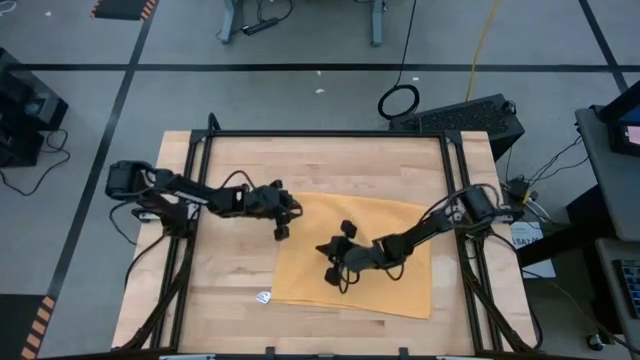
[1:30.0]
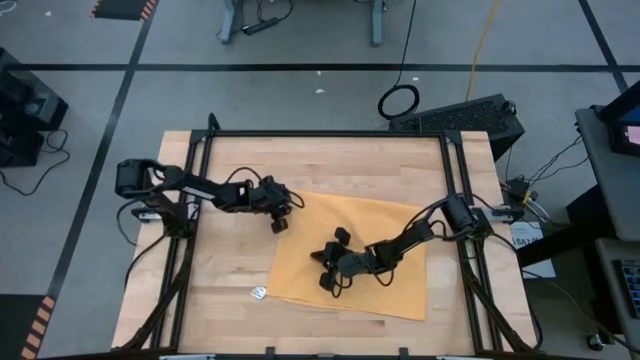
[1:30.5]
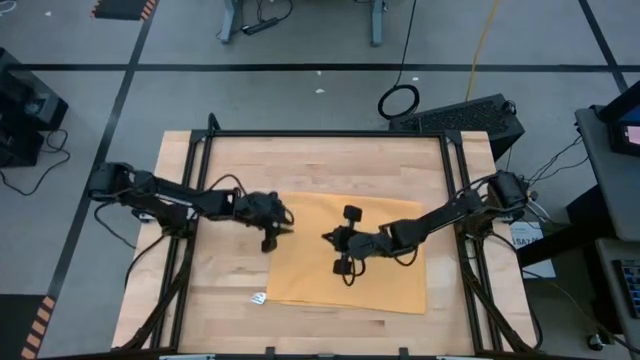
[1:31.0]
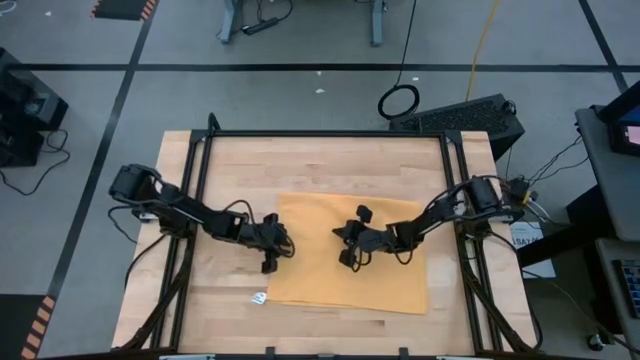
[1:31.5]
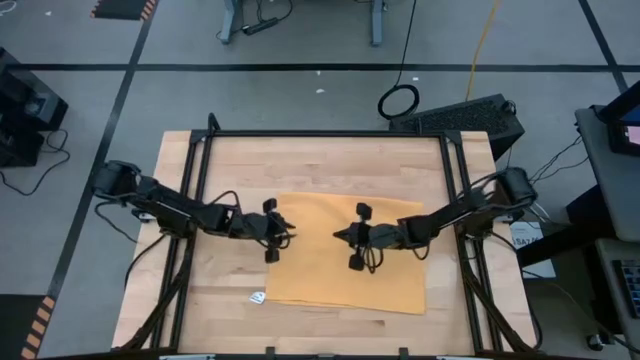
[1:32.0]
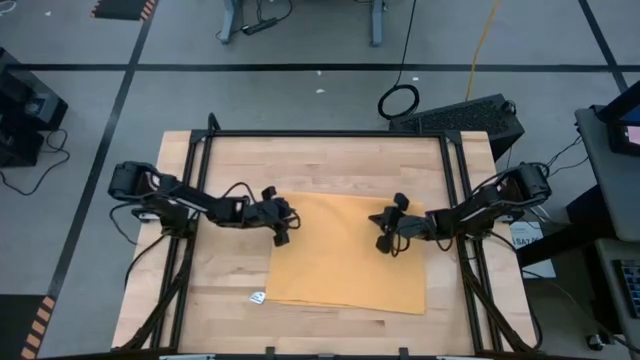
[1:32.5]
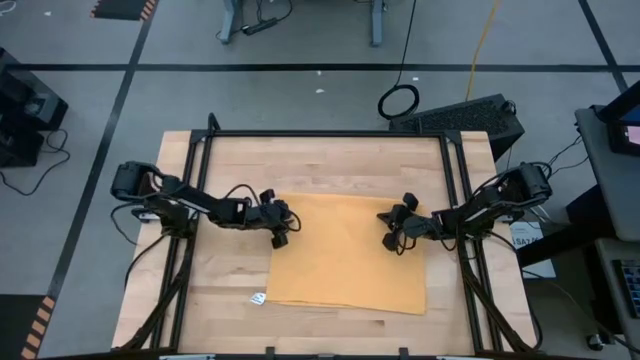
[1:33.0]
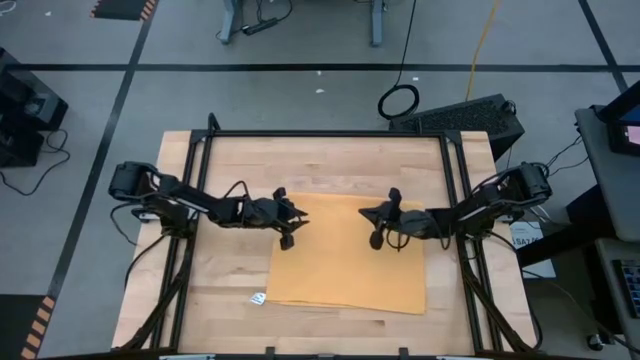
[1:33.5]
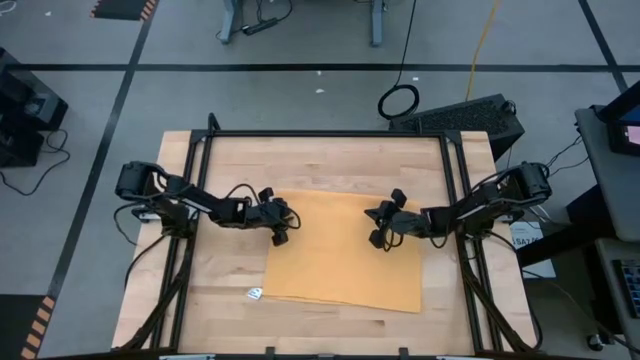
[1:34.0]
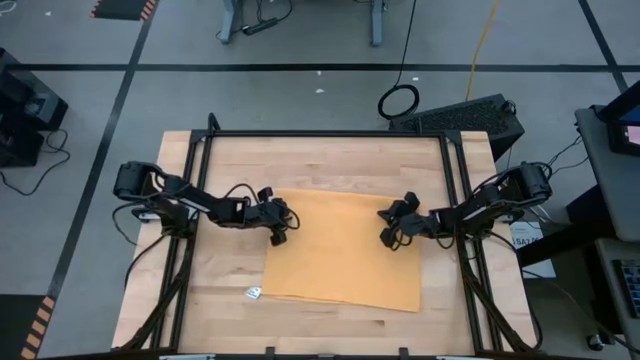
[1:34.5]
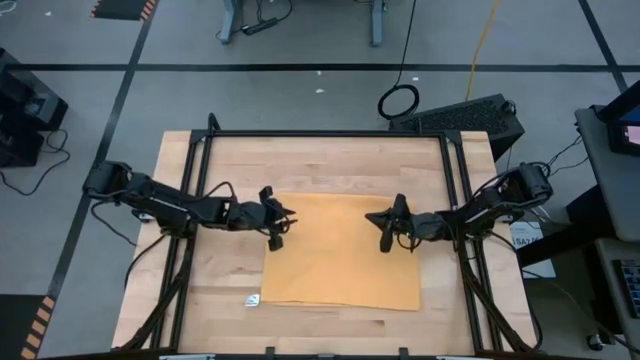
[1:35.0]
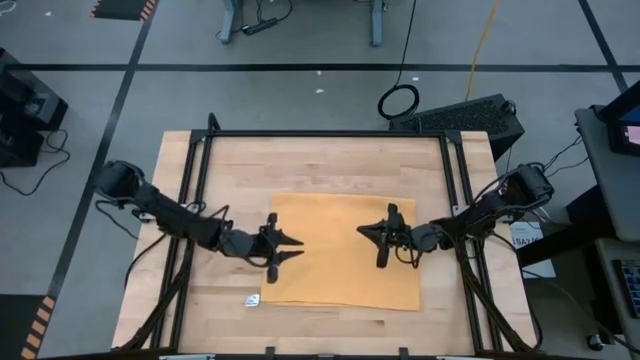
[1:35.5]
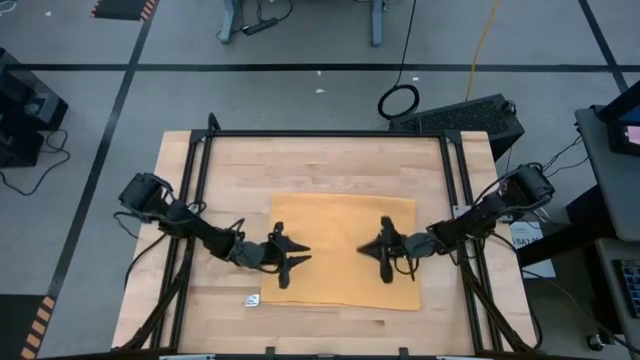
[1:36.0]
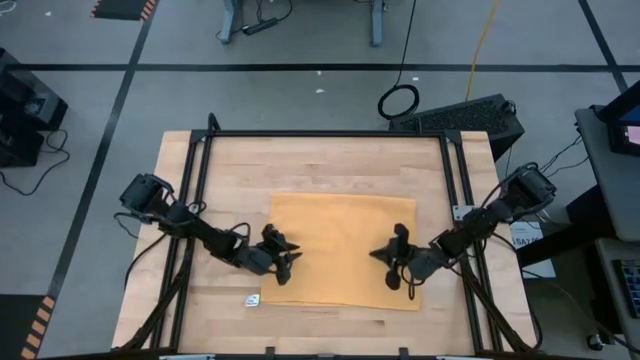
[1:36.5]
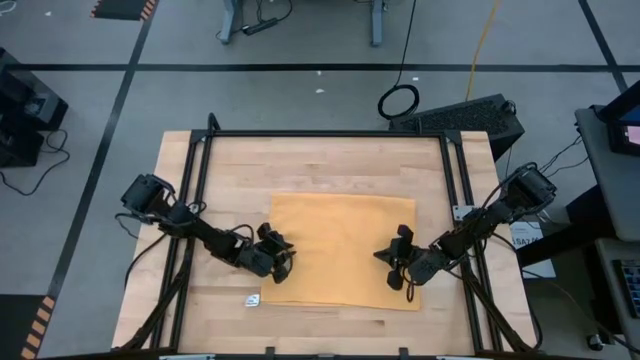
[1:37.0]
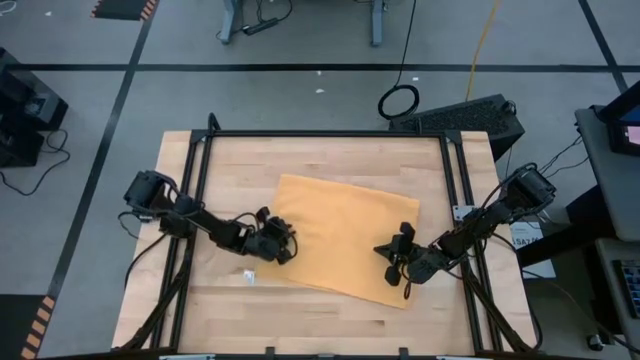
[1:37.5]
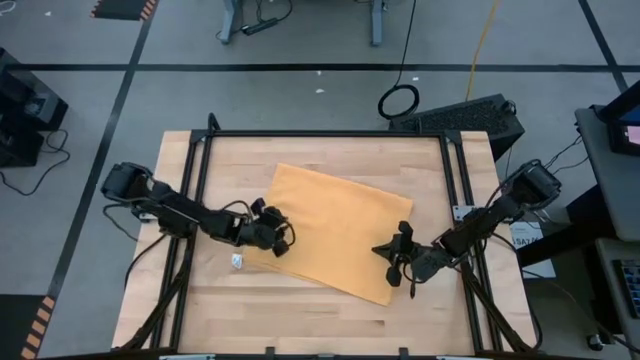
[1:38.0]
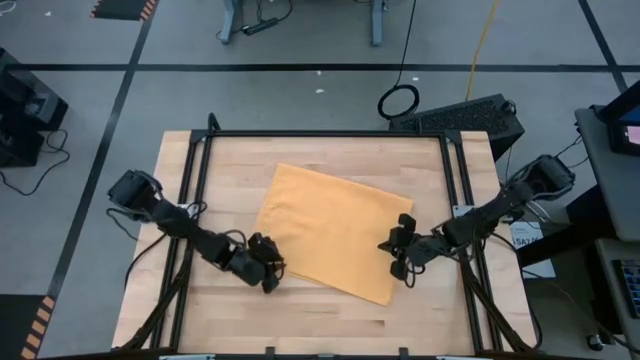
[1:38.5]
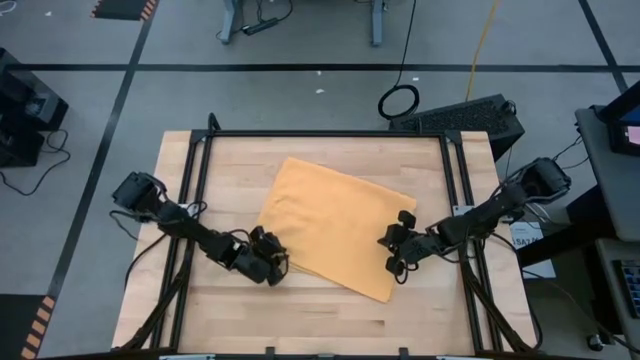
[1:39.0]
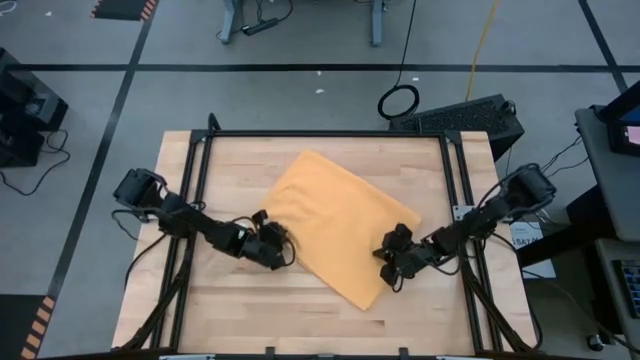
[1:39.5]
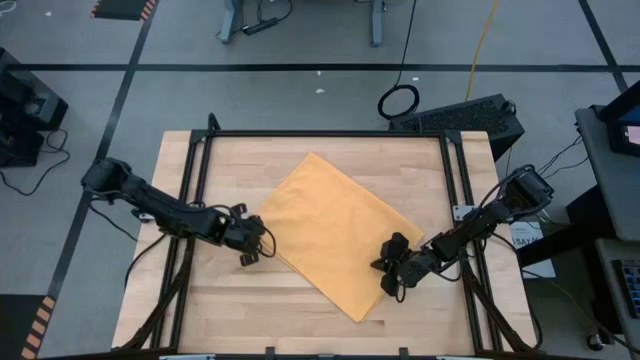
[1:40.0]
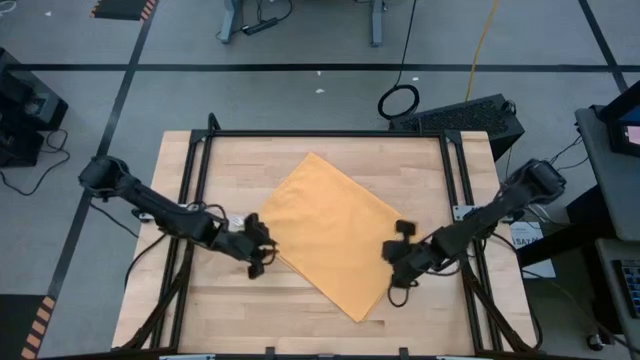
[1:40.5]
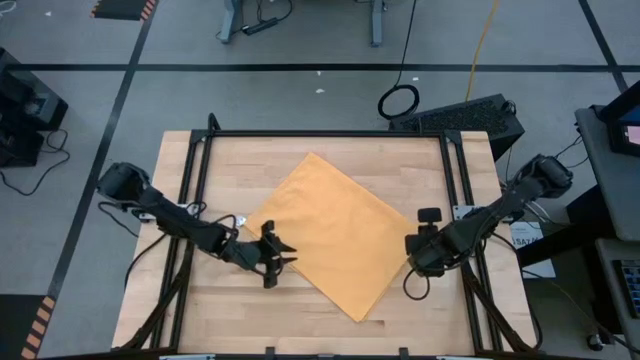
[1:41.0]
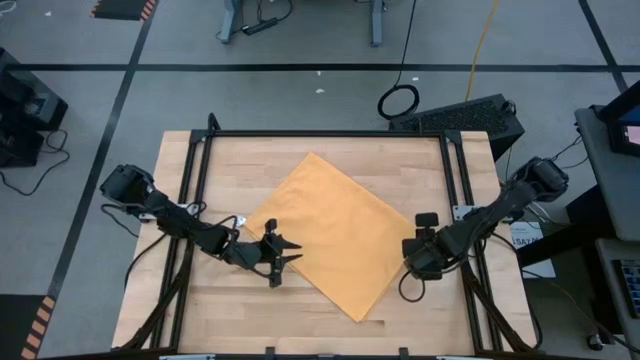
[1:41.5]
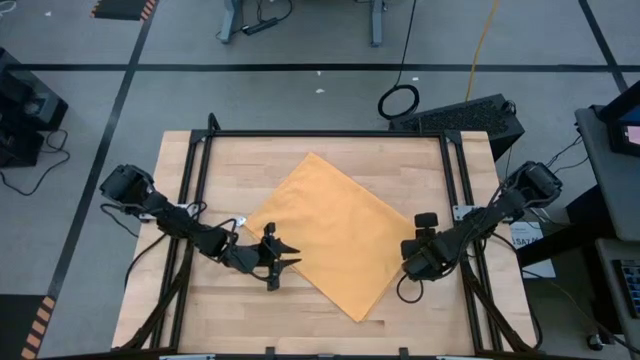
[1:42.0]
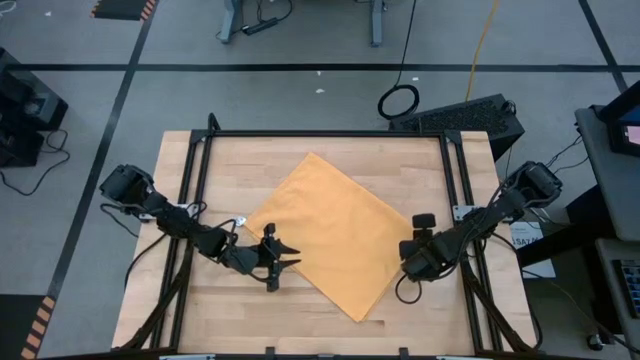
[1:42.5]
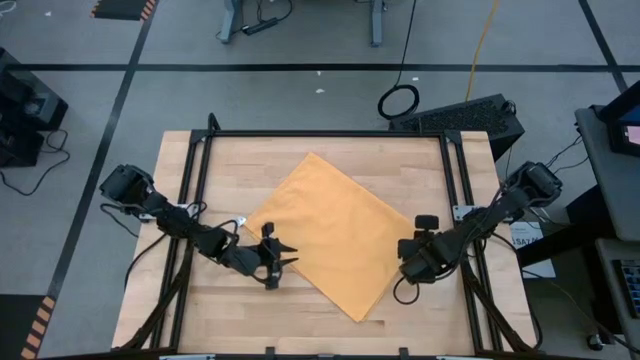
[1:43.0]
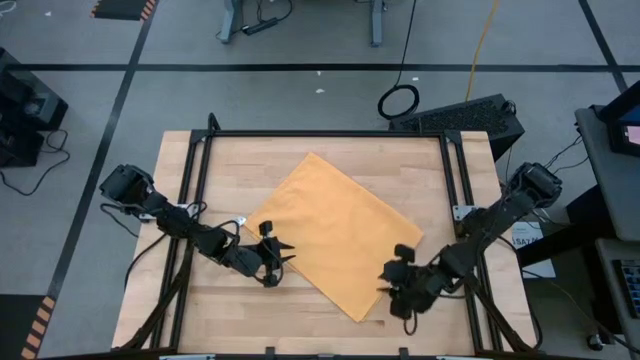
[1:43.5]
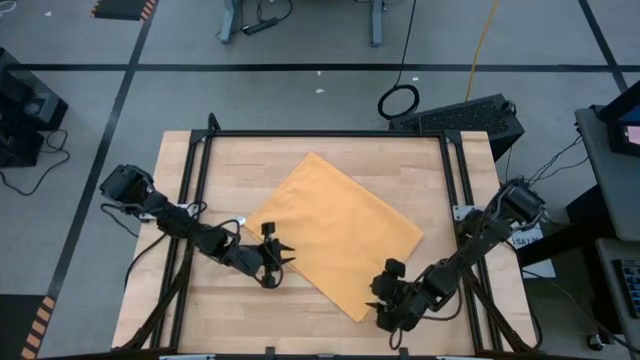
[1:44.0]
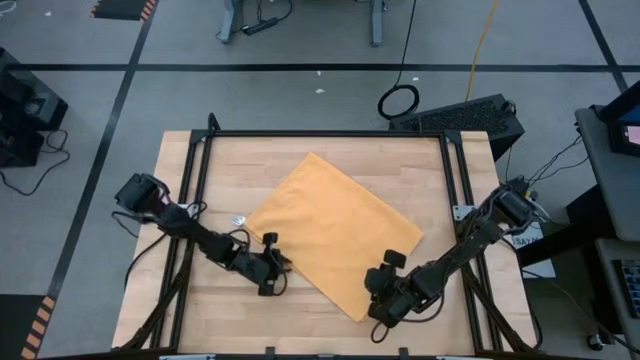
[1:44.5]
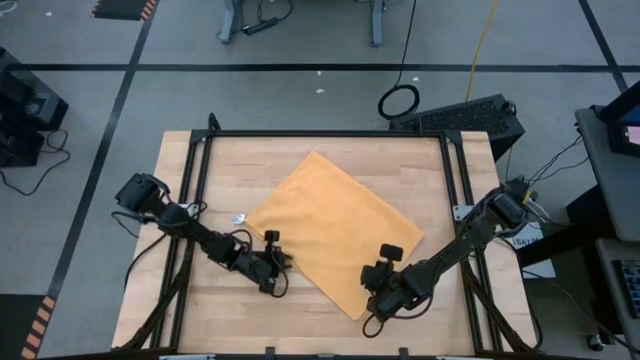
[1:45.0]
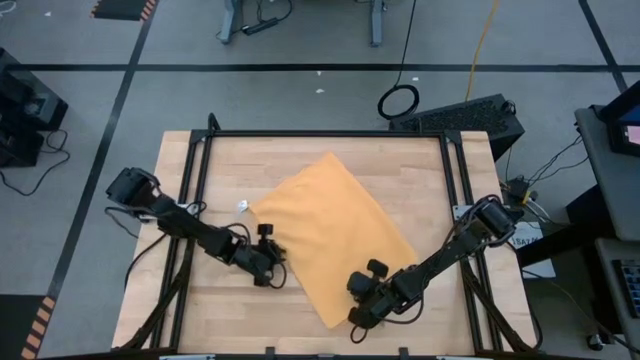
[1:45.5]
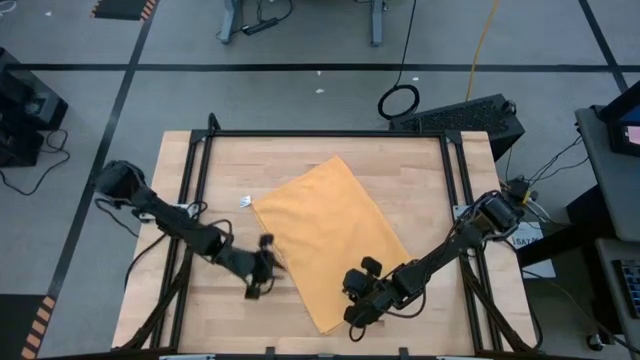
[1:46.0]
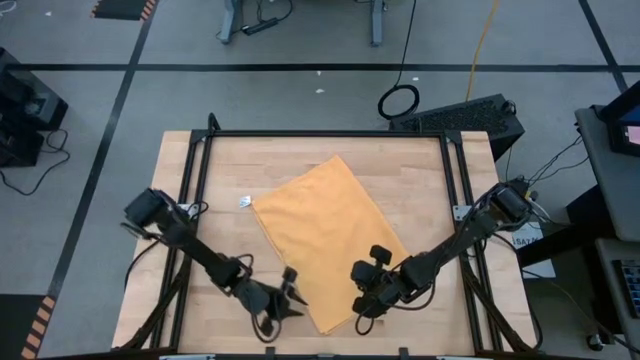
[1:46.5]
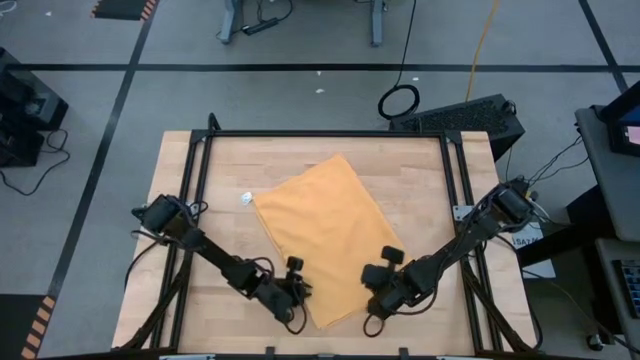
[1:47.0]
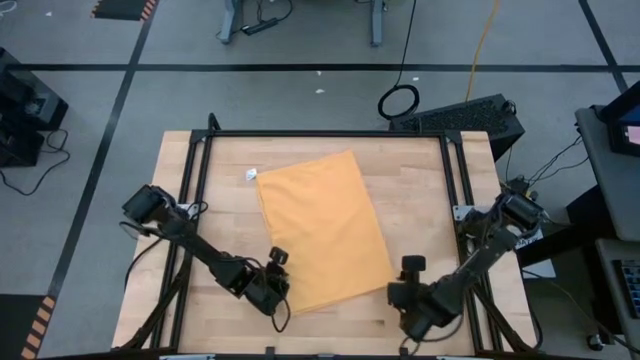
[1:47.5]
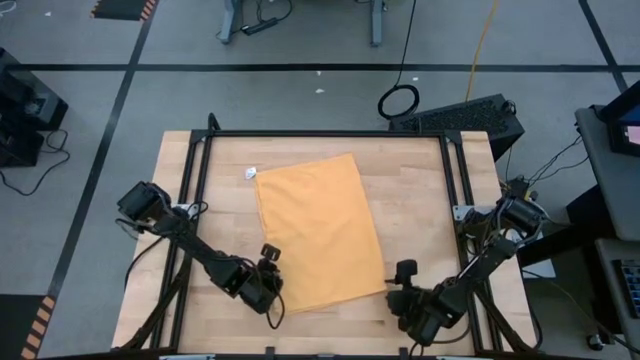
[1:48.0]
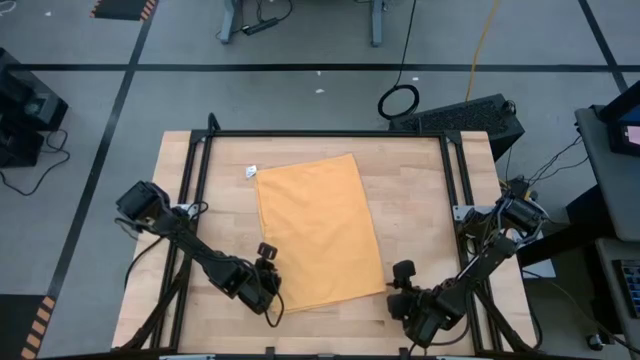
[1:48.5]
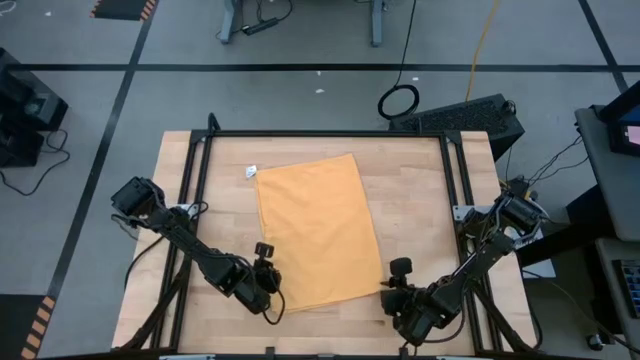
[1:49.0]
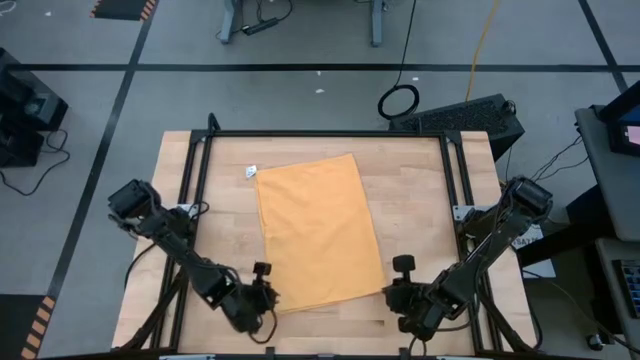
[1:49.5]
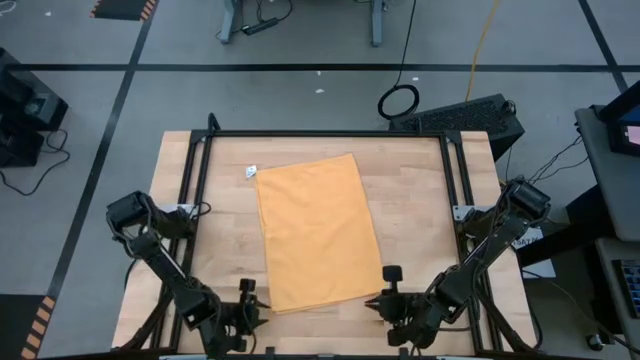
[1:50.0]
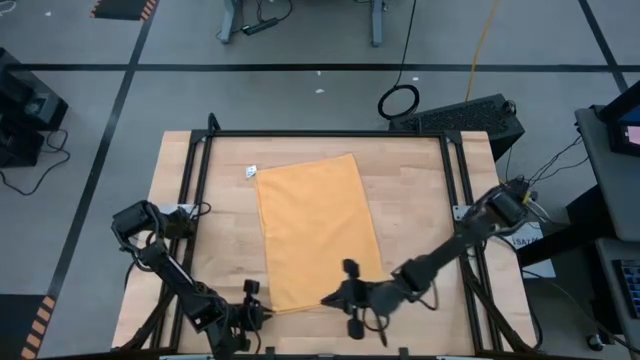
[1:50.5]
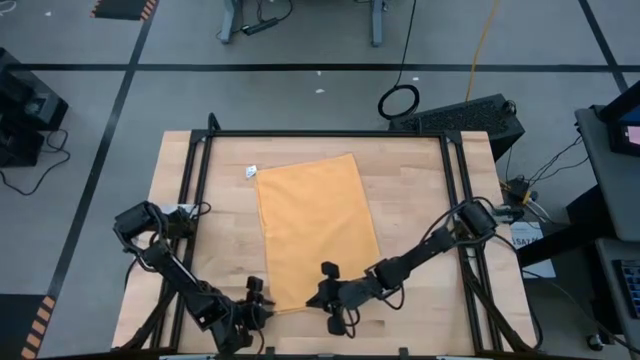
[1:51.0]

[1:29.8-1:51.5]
Task: Roll towel
Fold the yellow towel in
